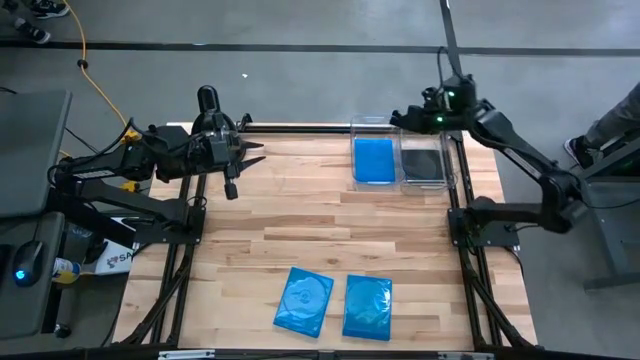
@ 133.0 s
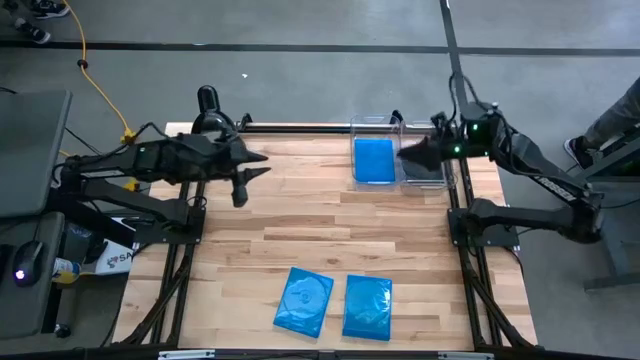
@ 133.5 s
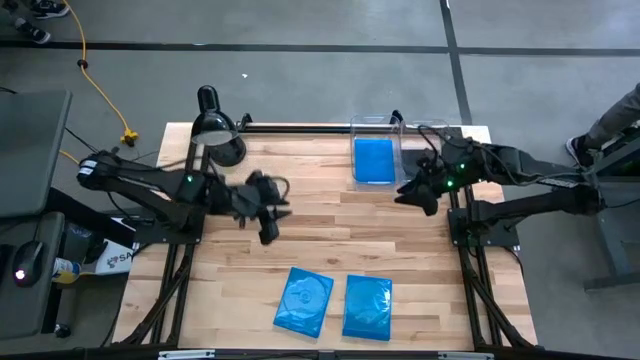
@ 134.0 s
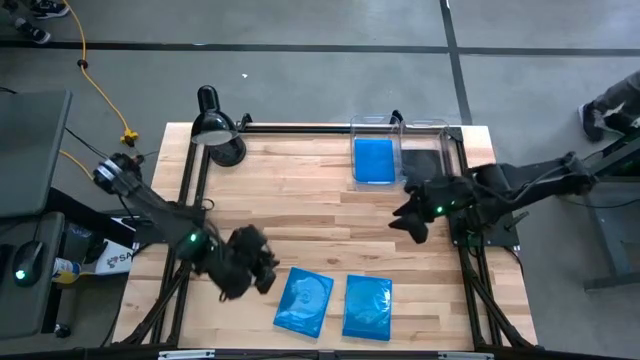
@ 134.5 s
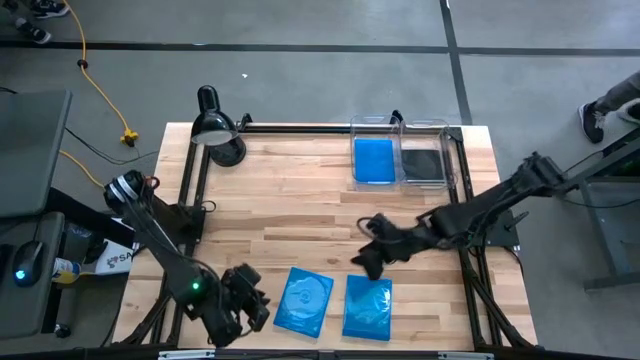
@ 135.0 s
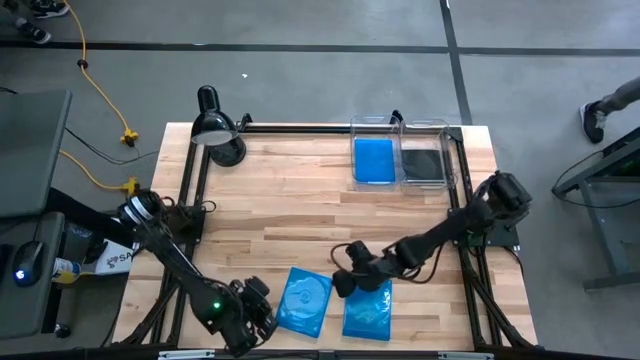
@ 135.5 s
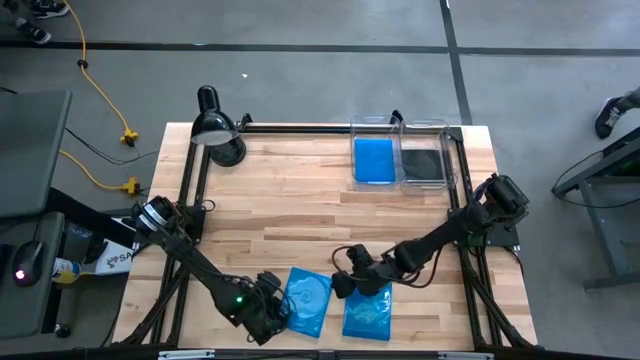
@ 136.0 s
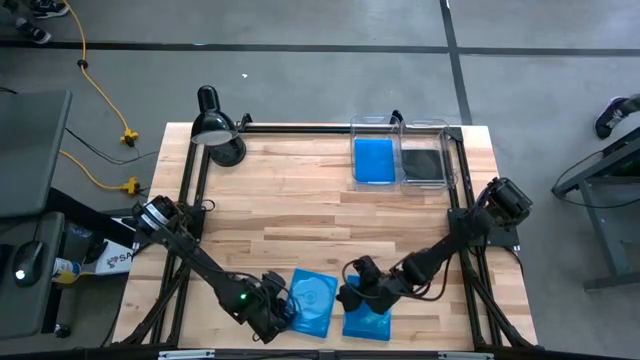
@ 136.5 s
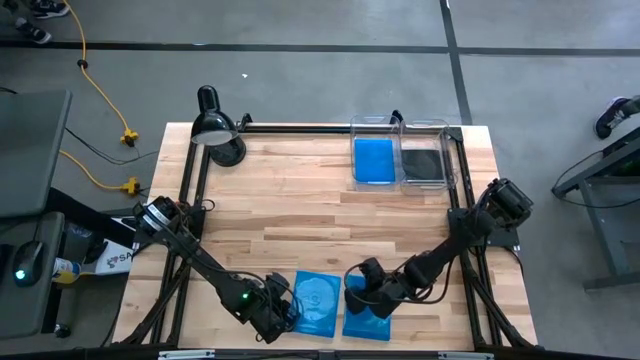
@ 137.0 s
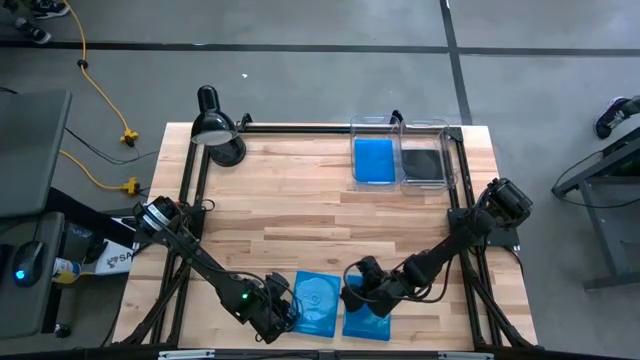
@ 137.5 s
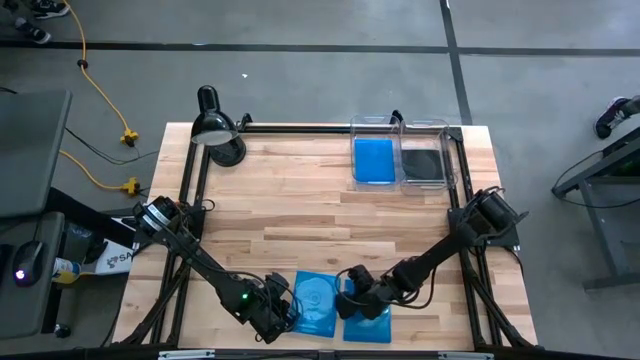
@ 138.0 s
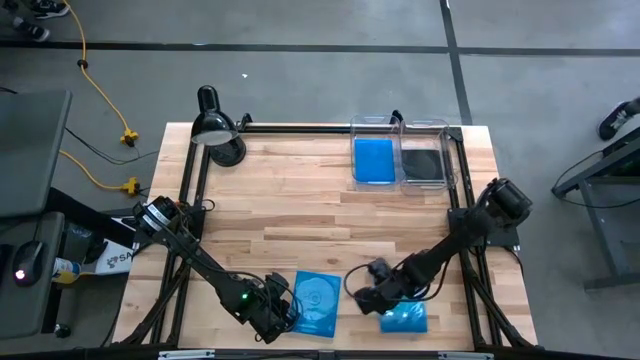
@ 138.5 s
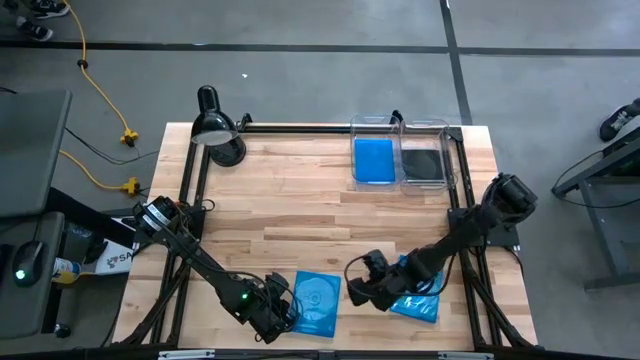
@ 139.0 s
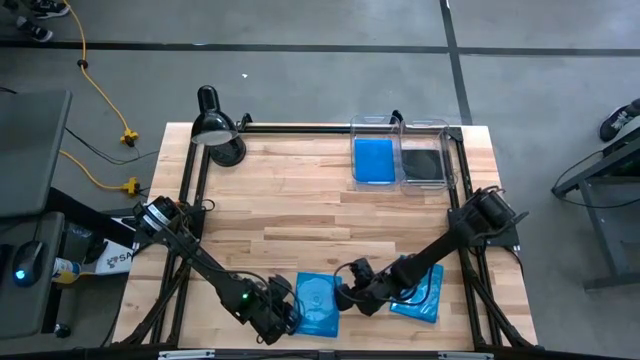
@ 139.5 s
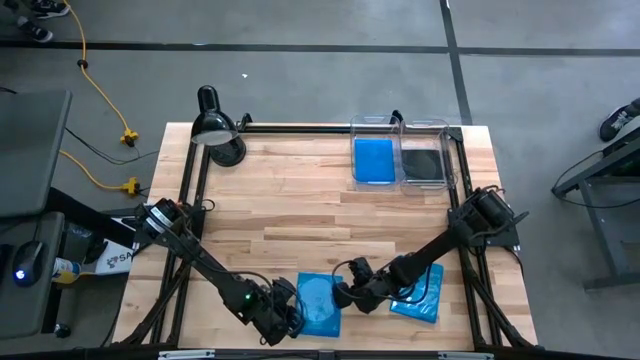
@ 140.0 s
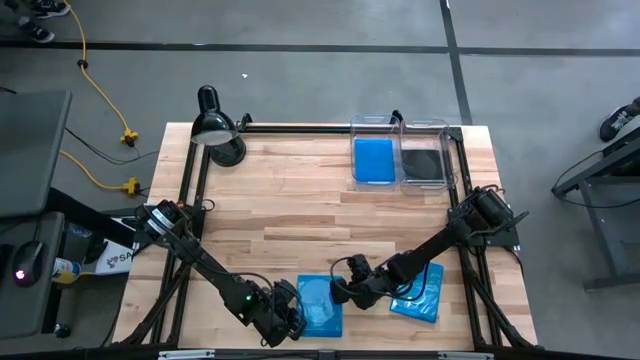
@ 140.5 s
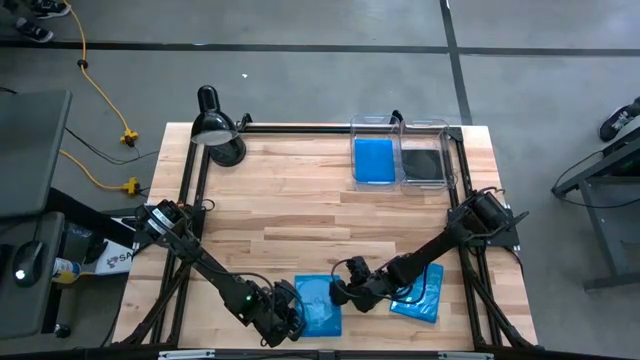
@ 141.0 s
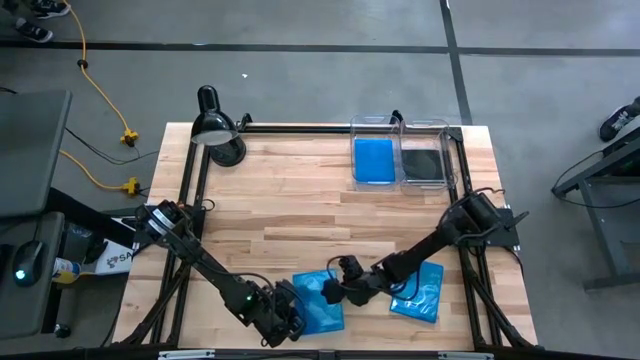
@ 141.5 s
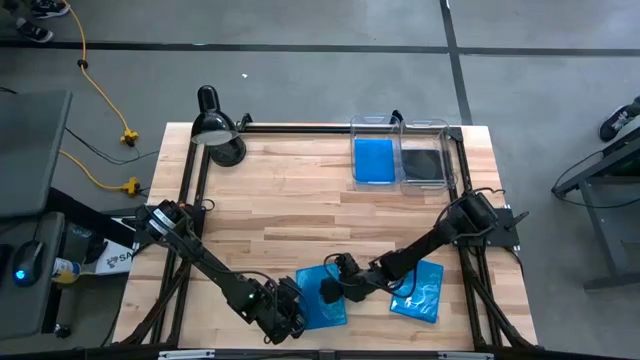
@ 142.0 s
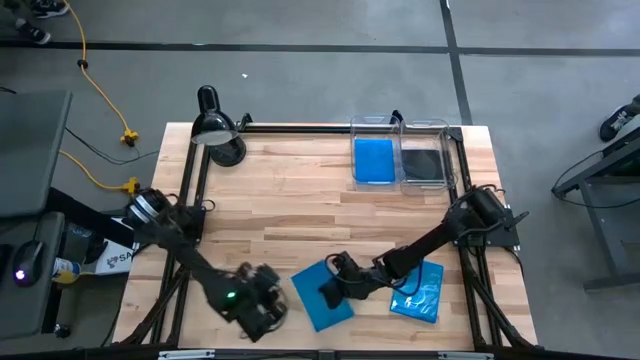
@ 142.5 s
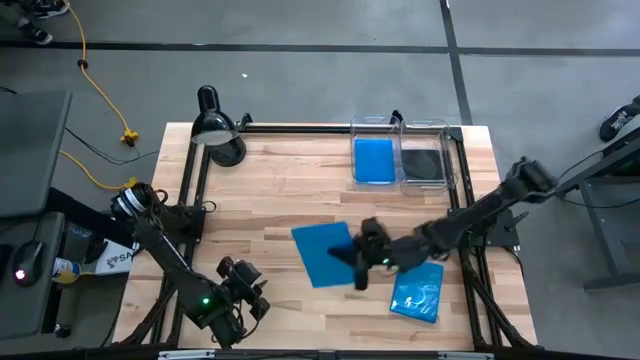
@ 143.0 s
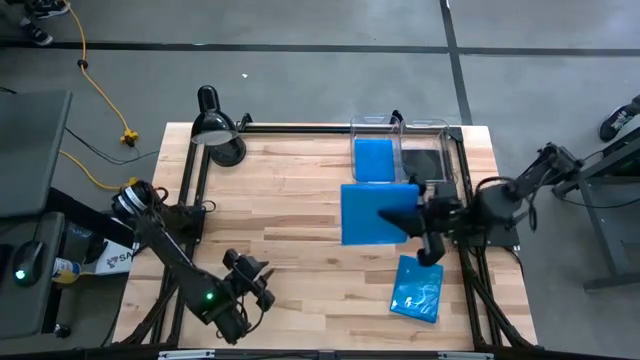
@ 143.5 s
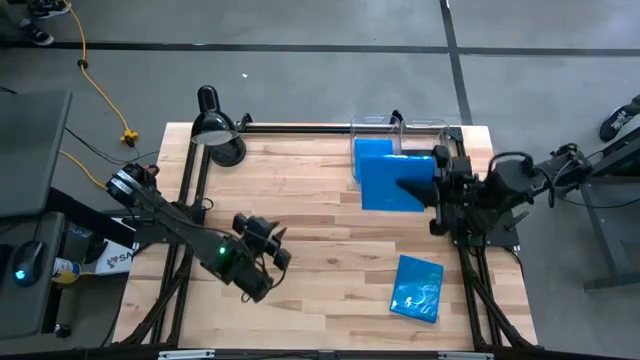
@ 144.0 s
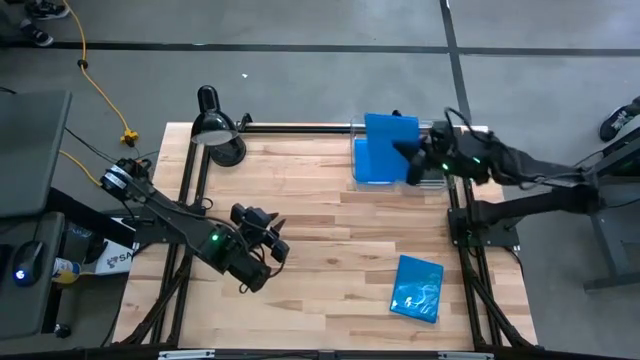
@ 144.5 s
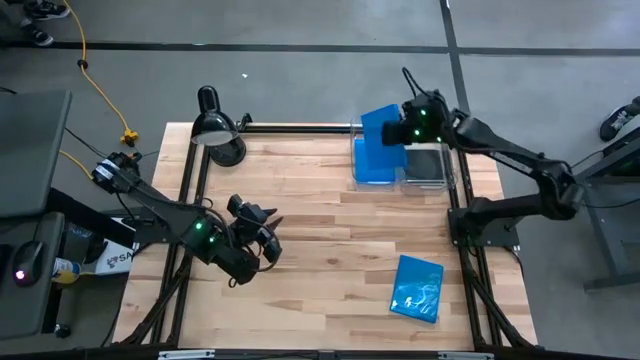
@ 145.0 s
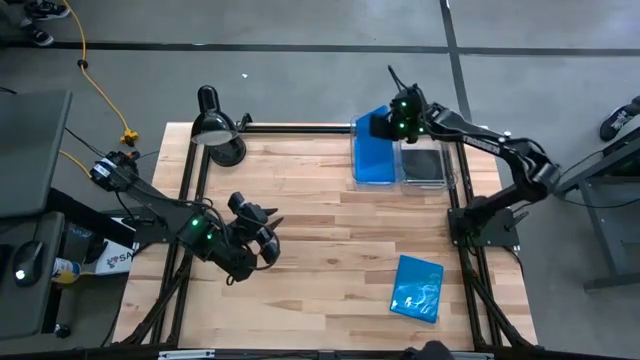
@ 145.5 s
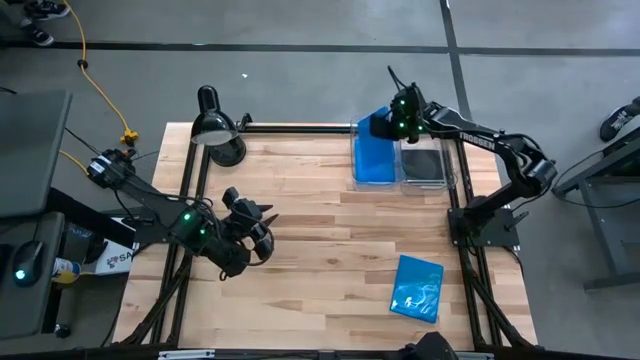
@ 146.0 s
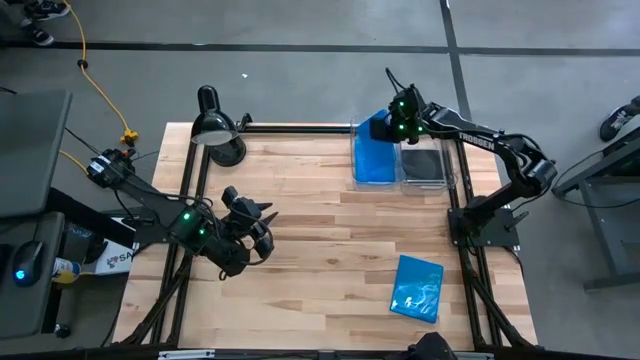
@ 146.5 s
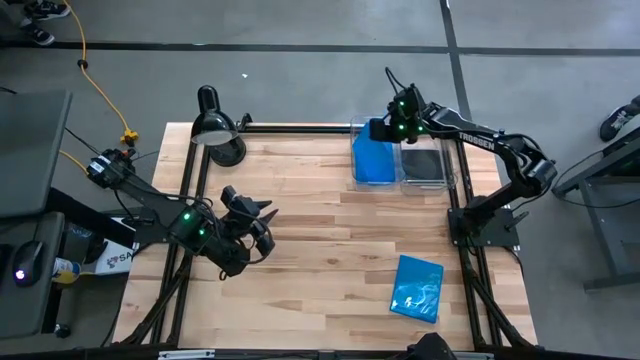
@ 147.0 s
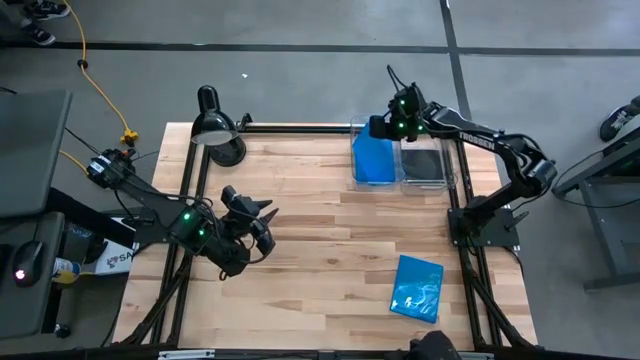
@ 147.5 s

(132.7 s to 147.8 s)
Task: Pick & place jewel cases by type
Put the left blue CD case into the left transparent bin
